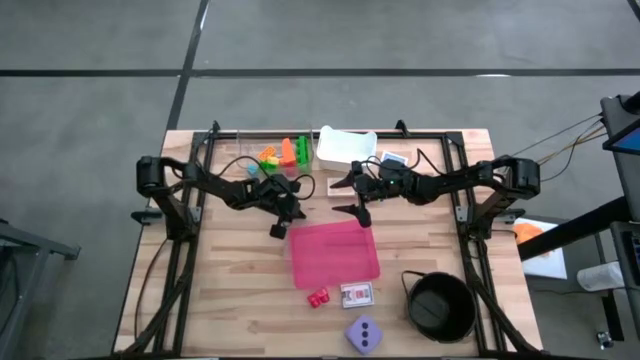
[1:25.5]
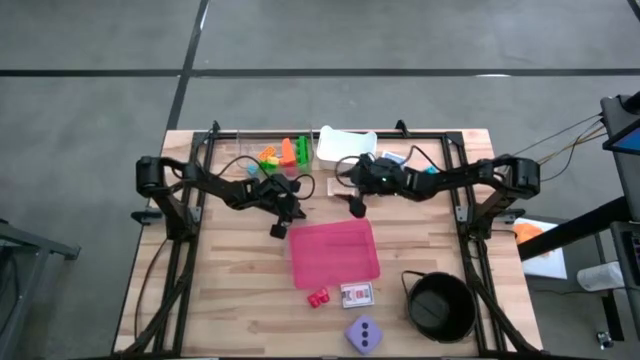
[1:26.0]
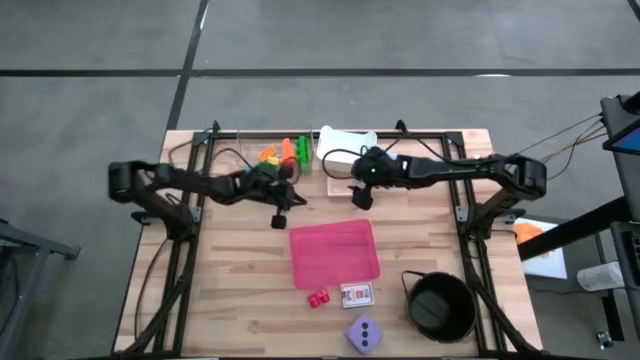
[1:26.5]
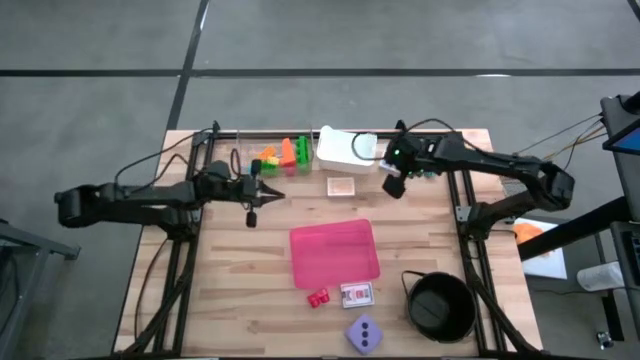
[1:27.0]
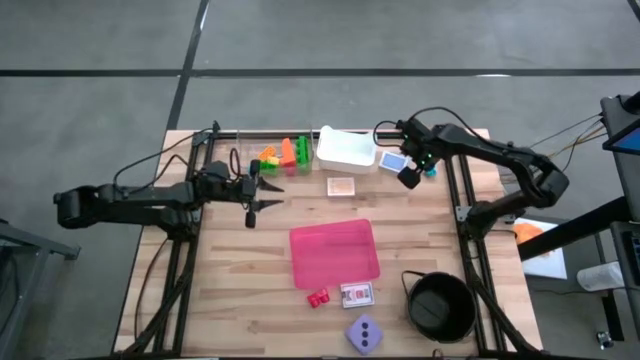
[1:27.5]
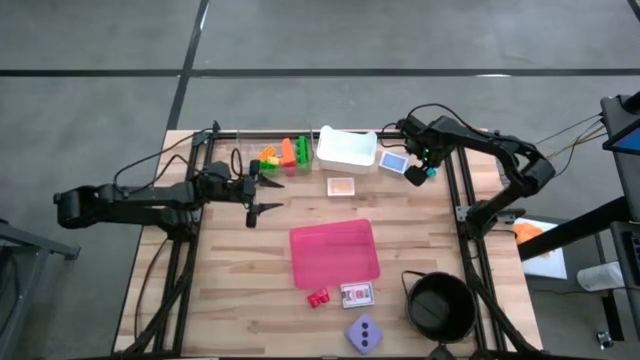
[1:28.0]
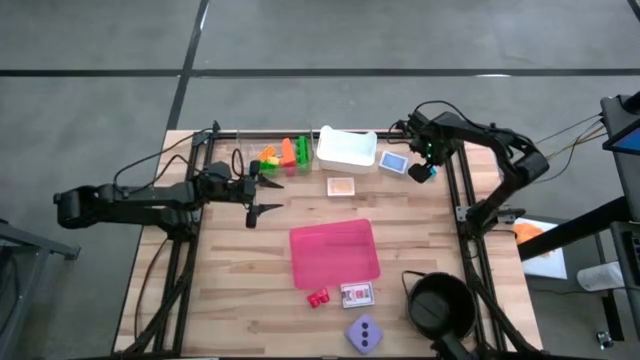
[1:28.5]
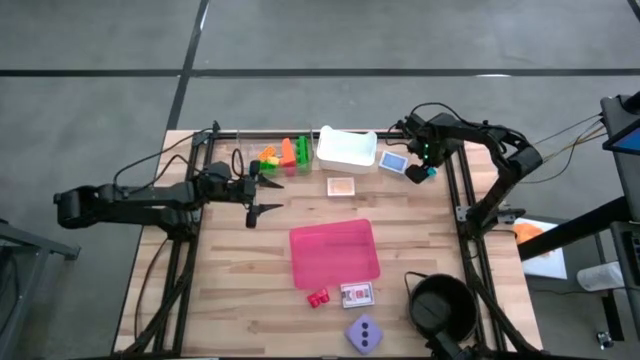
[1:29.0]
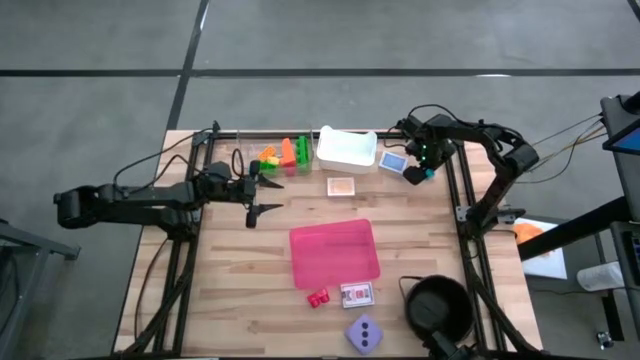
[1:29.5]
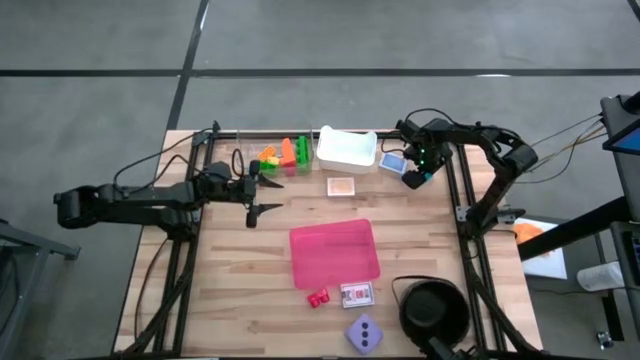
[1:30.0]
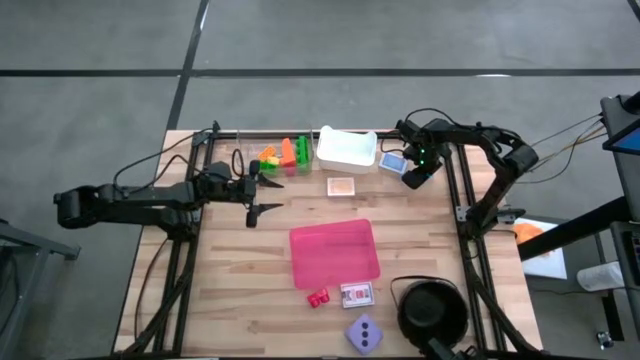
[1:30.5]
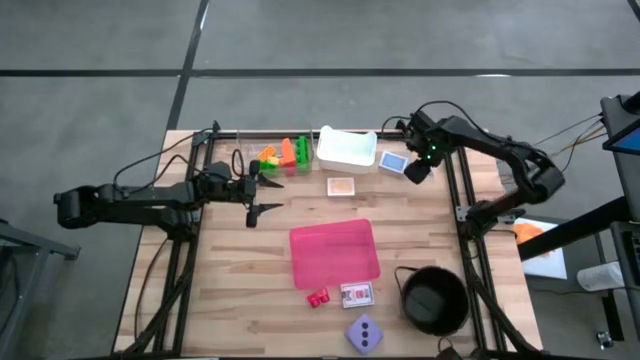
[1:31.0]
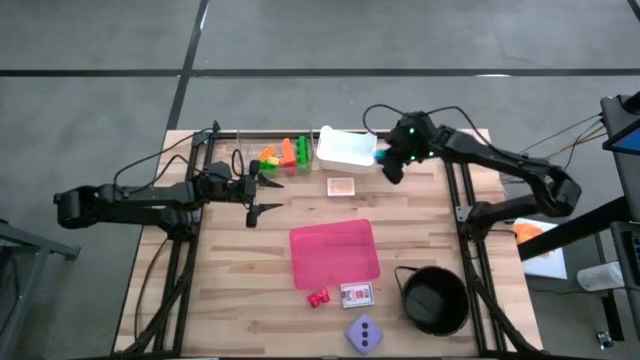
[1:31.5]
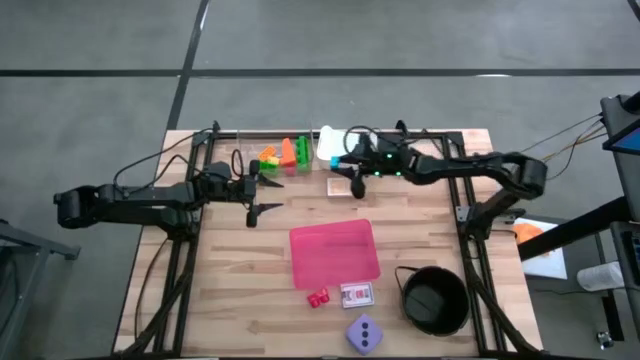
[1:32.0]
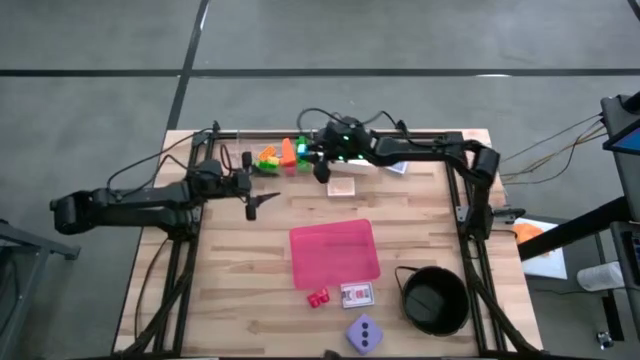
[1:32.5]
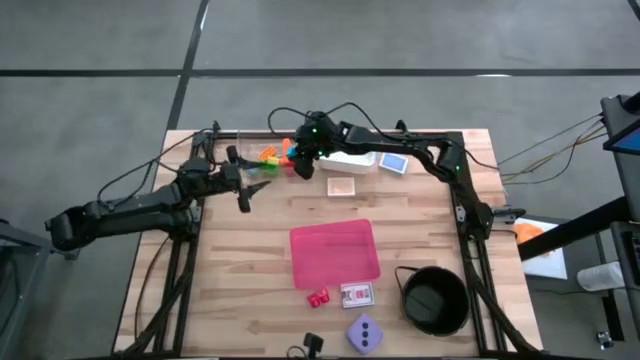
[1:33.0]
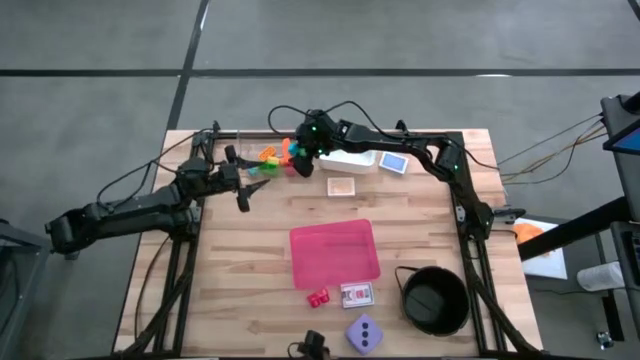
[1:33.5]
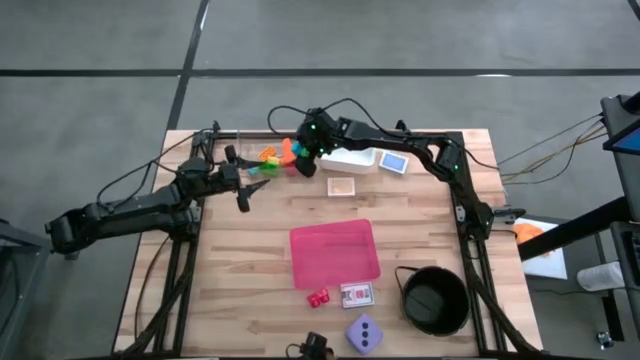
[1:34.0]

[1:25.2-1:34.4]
Task: Pick & Place Toys
Put the blue game piece into the transparent bin

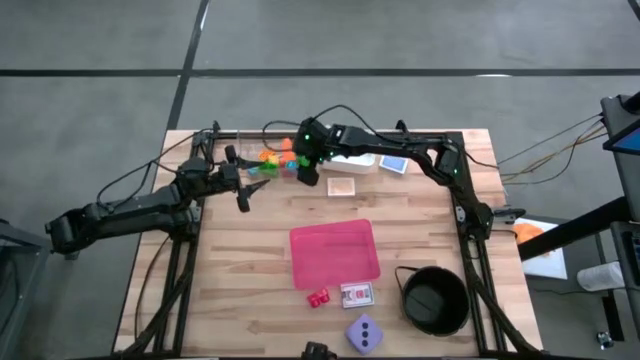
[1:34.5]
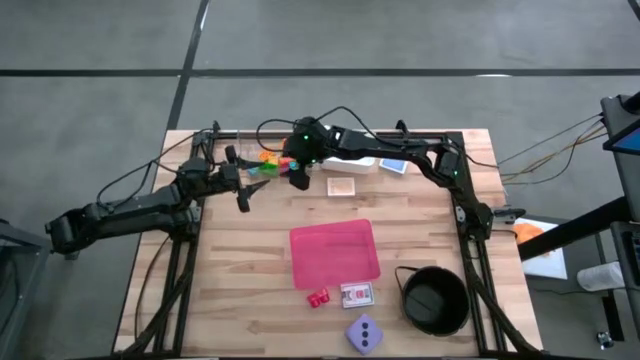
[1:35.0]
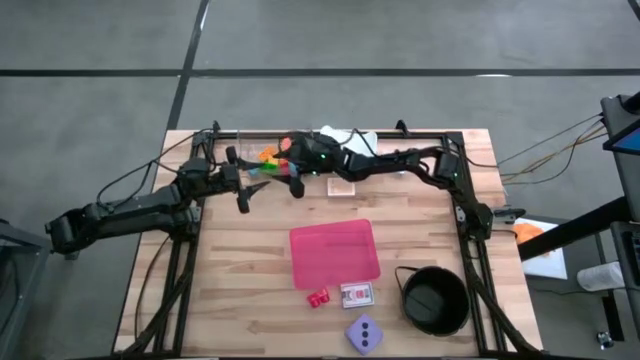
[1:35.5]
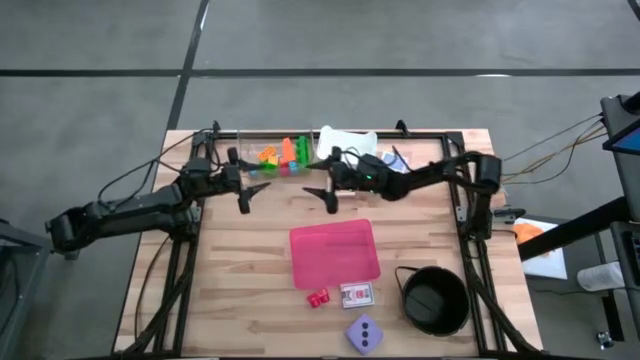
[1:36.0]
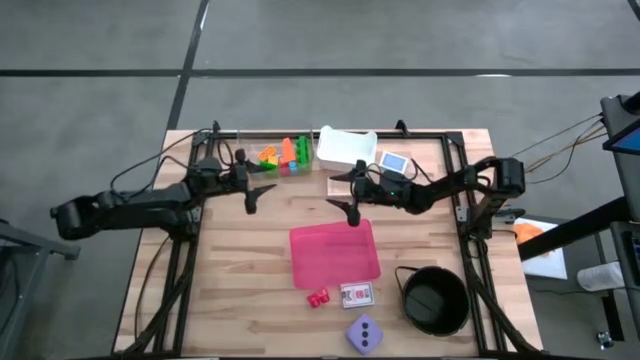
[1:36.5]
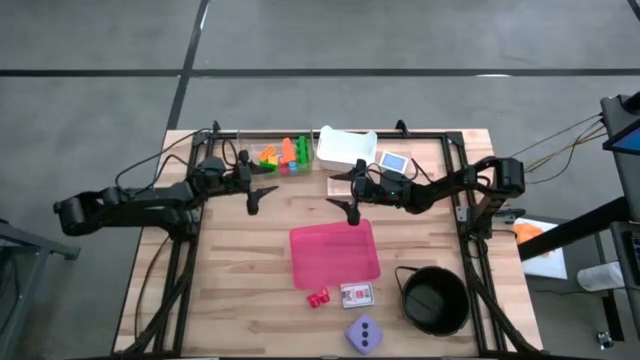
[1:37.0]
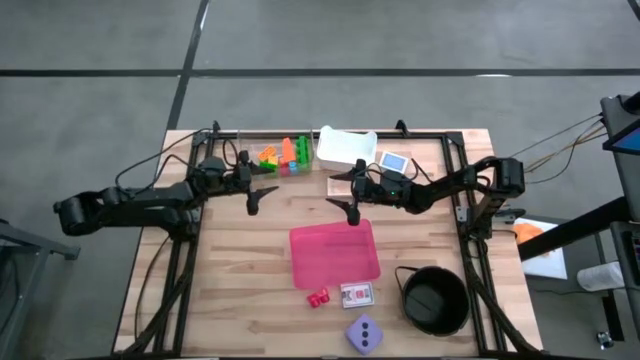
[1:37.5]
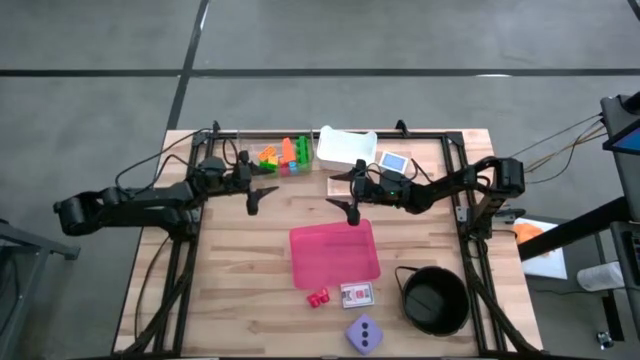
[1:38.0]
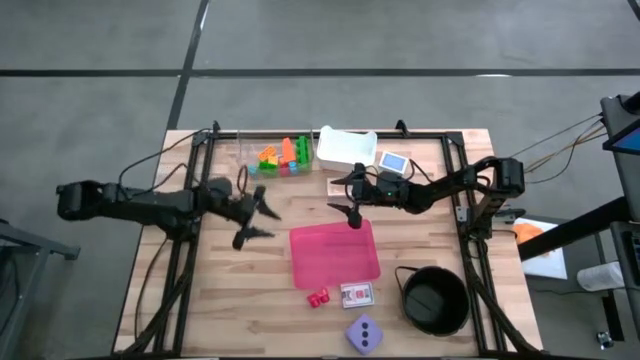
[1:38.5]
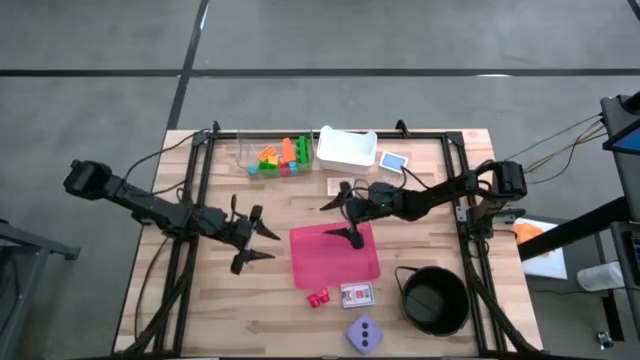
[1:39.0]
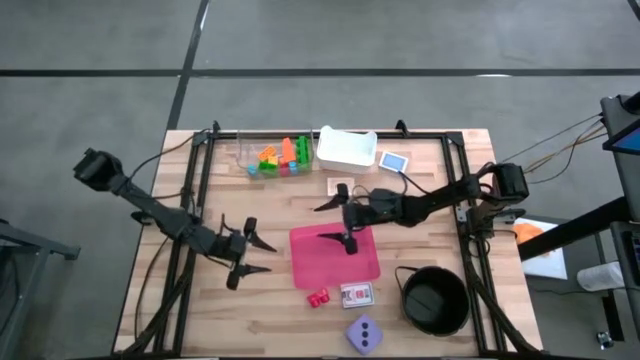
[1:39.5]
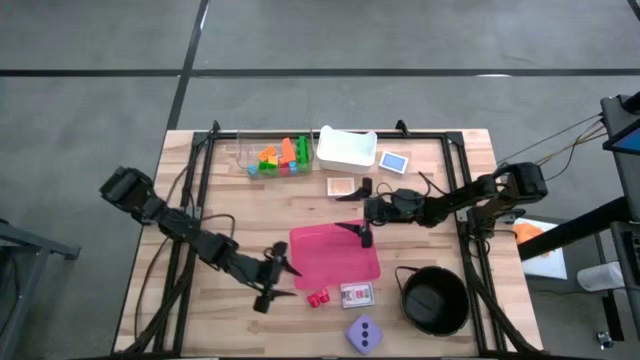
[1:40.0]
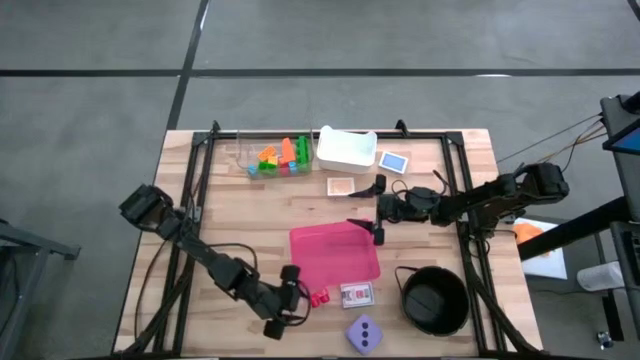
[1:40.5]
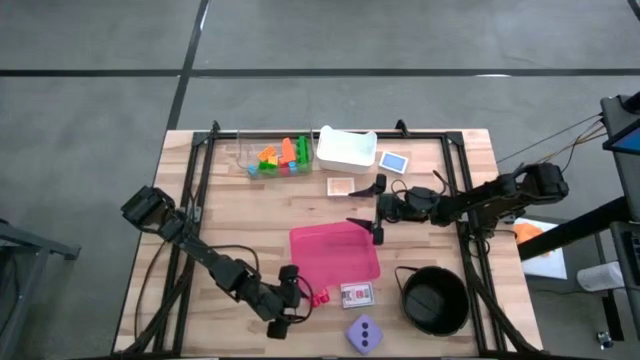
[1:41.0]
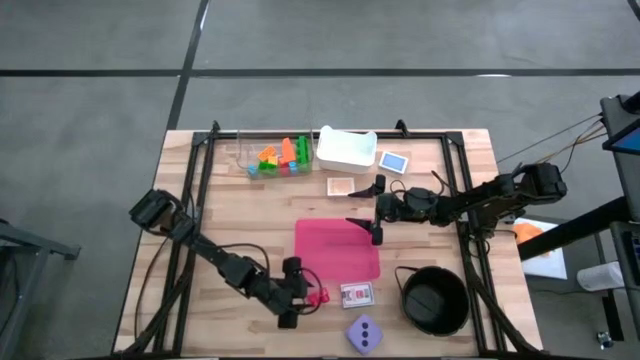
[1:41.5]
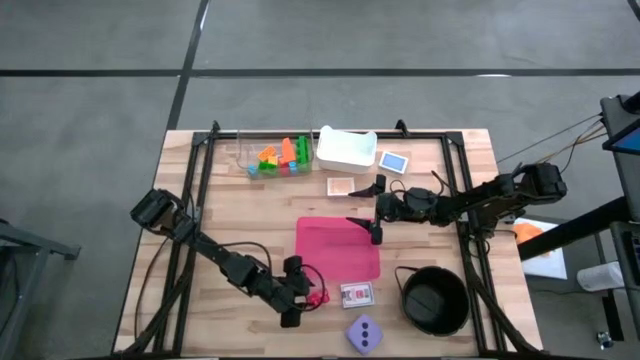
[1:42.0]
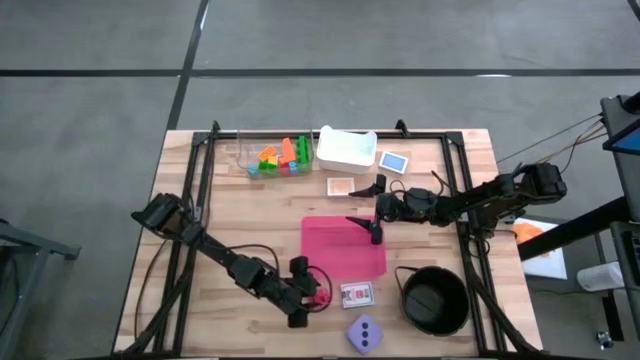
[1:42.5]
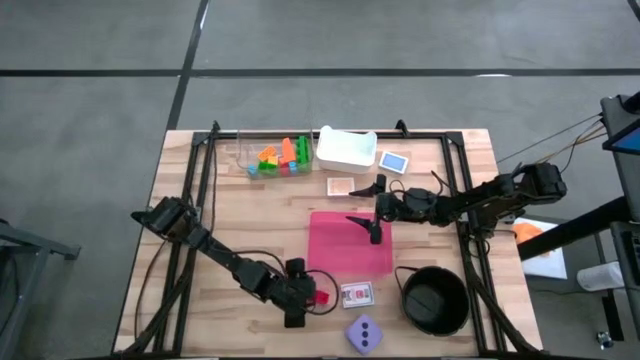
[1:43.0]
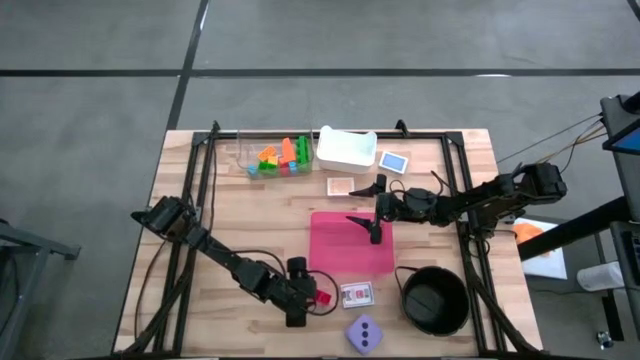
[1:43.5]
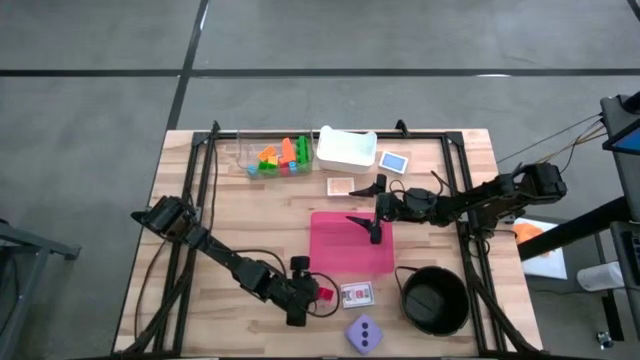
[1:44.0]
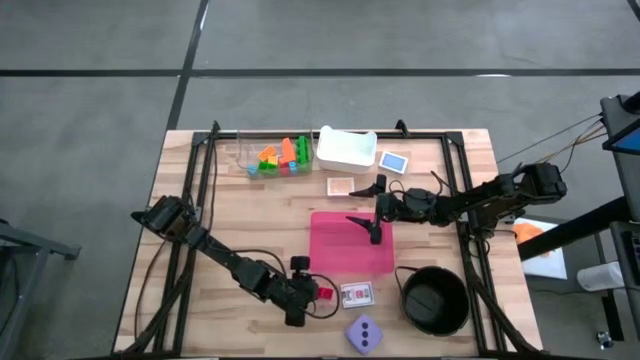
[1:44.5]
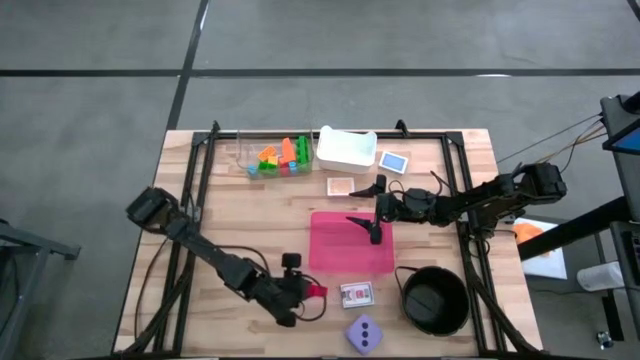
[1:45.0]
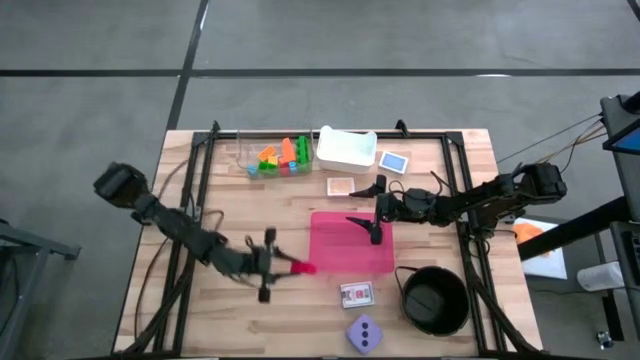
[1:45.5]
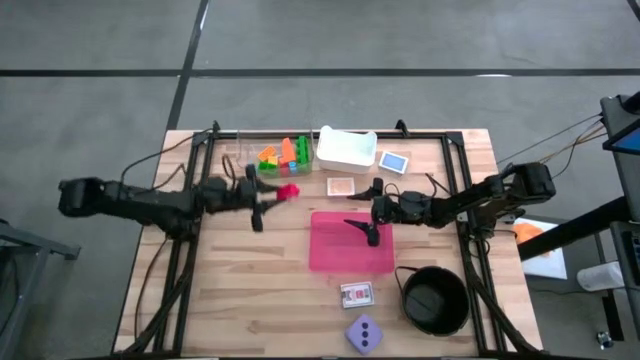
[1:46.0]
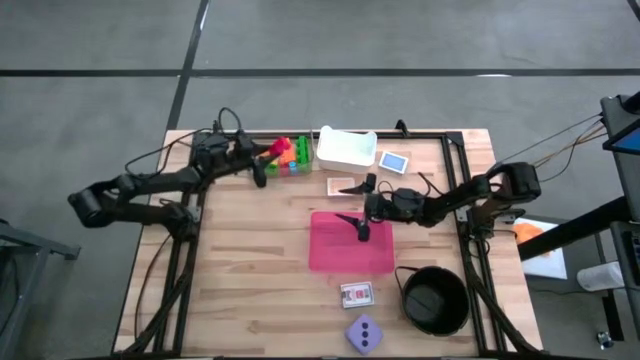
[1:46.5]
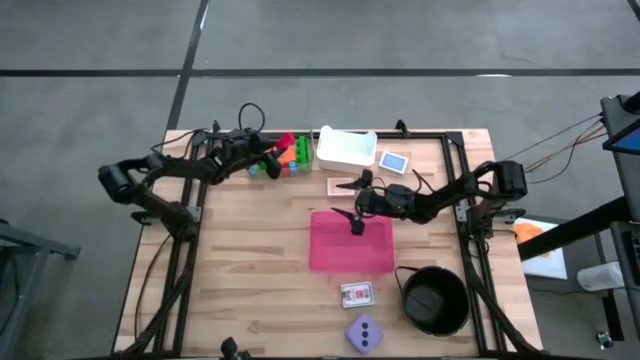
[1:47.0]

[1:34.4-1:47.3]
Put the red game piece into the transparent bin
